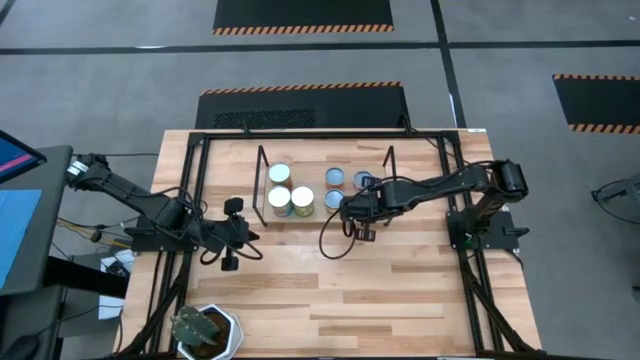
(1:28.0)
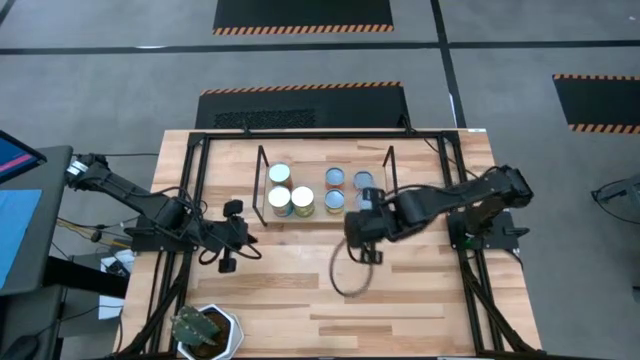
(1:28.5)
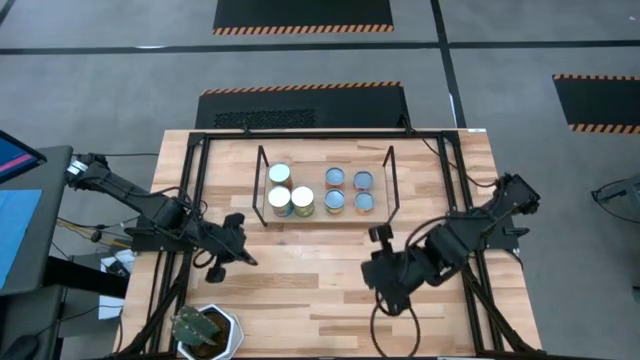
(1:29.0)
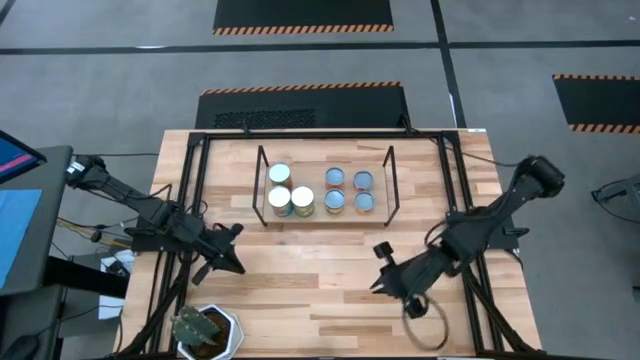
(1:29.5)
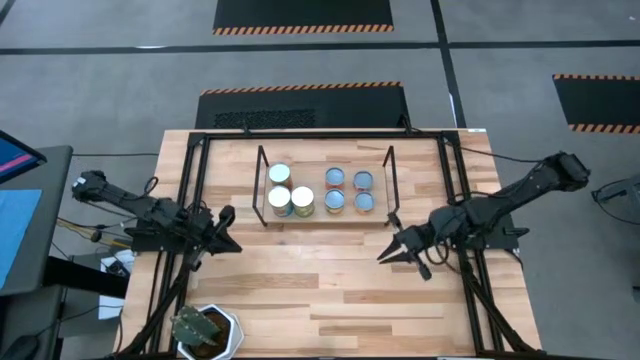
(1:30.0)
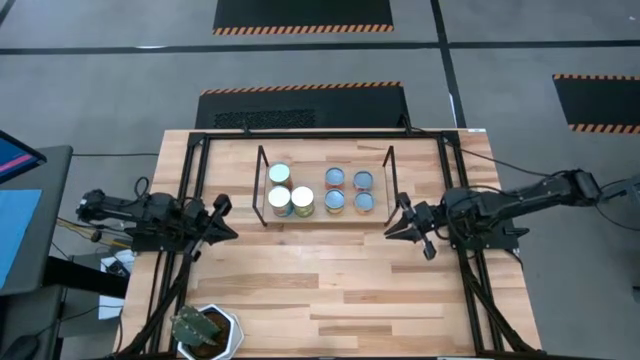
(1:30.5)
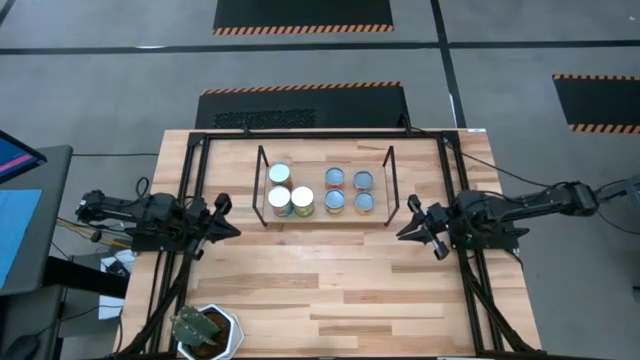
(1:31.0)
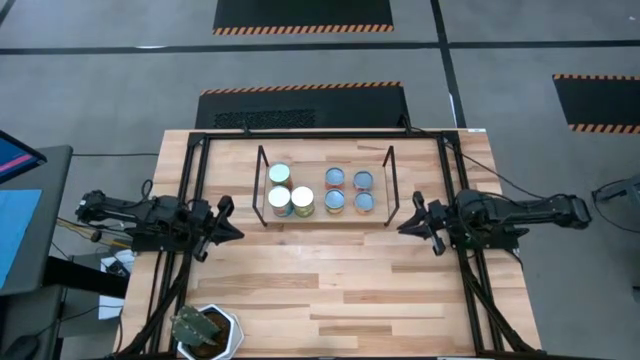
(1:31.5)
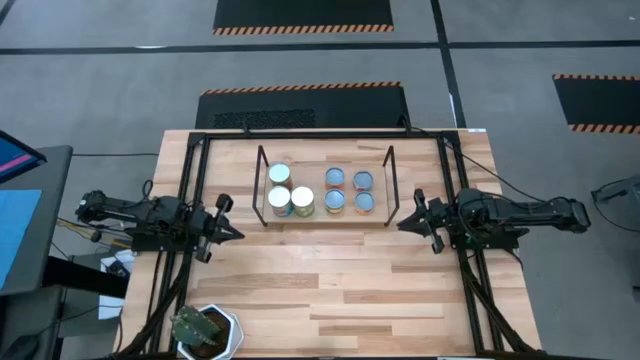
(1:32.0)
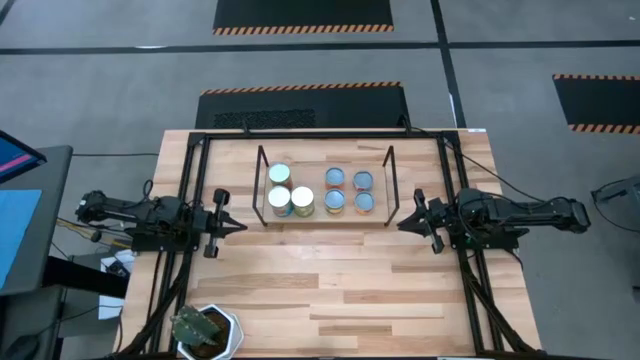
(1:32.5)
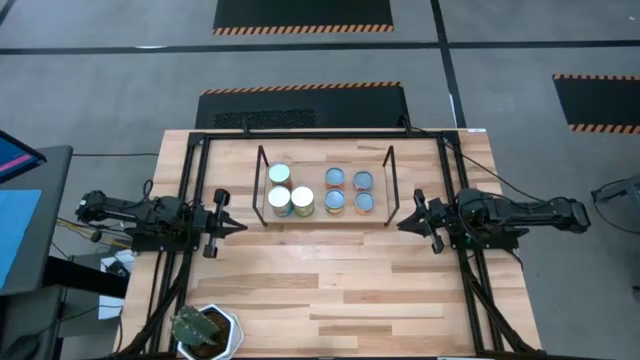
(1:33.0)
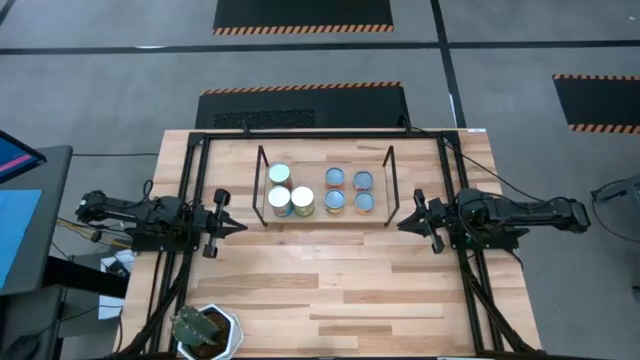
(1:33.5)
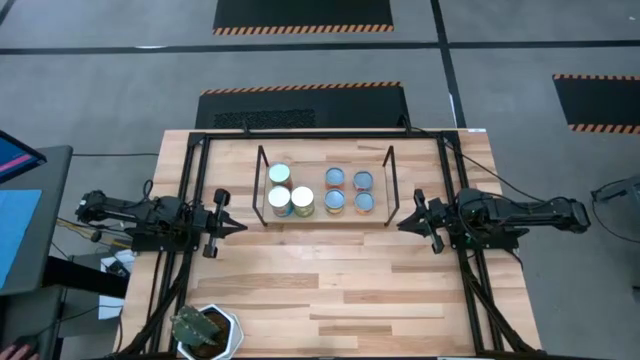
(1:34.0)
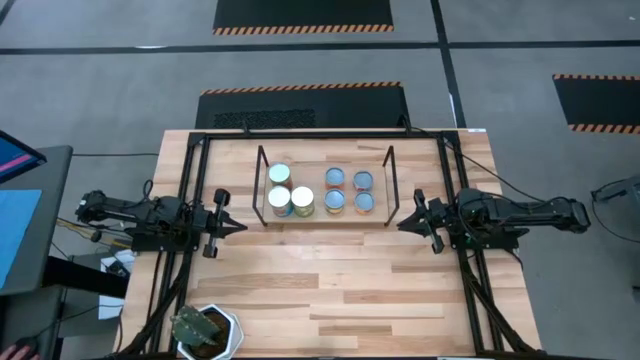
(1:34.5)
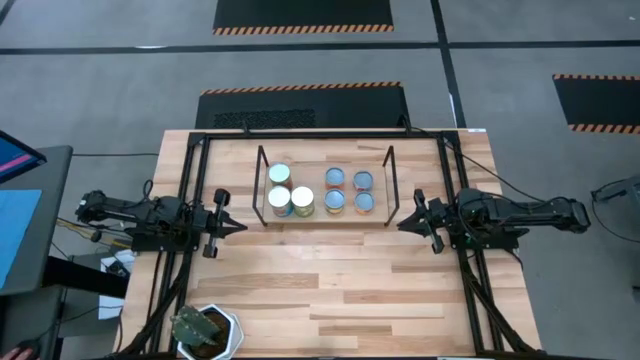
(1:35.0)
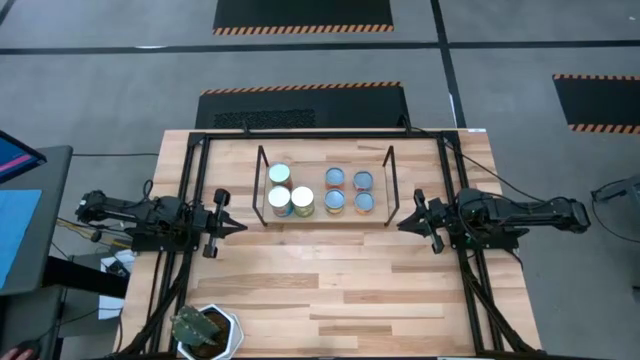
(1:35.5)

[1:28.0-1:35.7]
Task: Pick and place cans onto a shelf
Return to Home Position

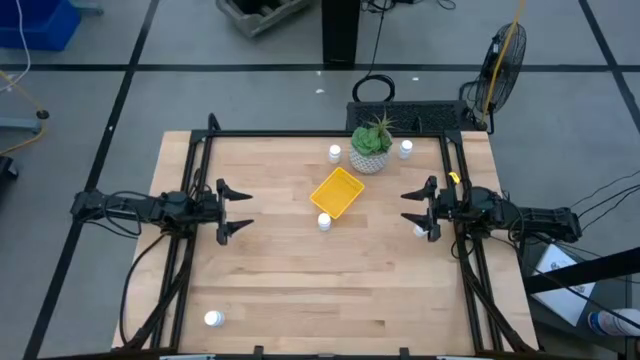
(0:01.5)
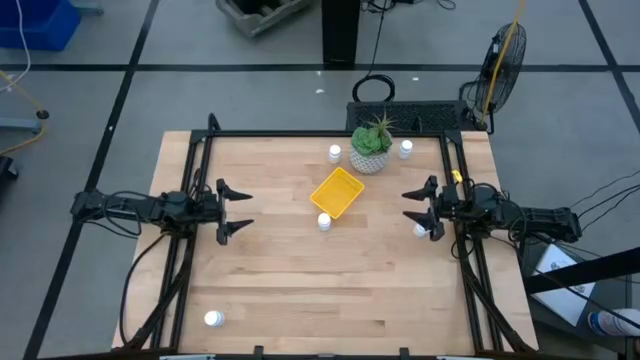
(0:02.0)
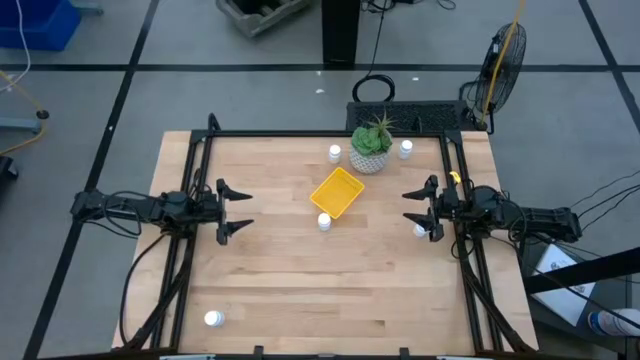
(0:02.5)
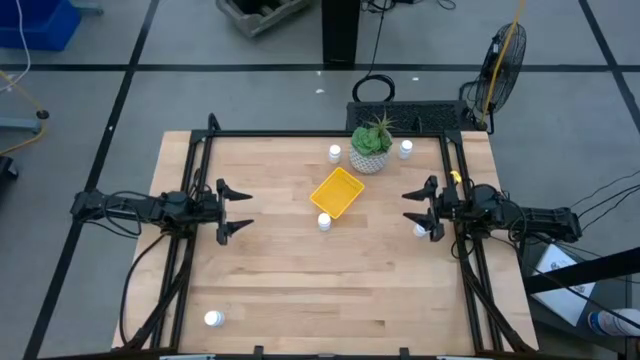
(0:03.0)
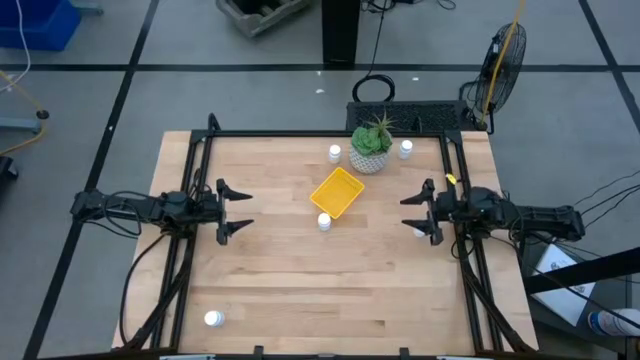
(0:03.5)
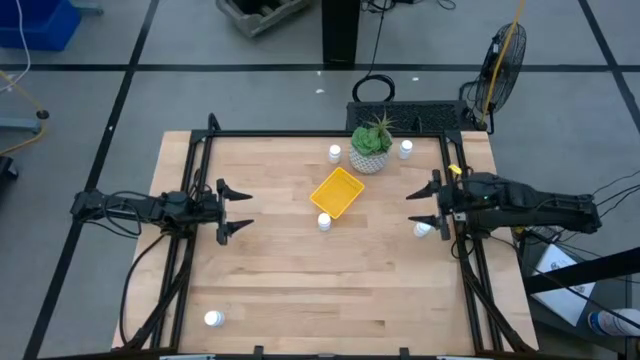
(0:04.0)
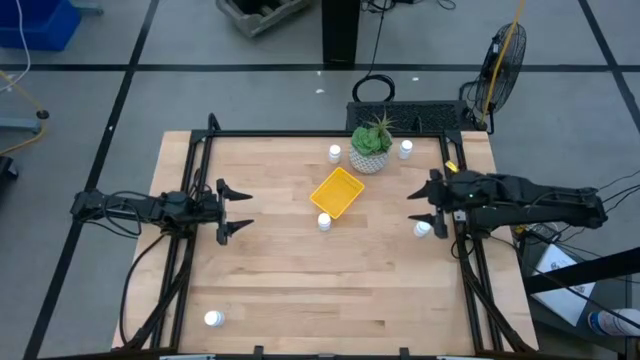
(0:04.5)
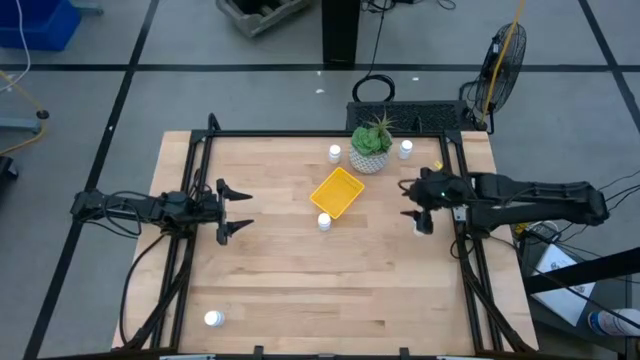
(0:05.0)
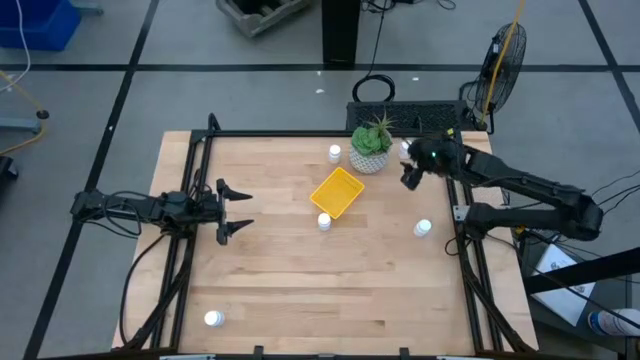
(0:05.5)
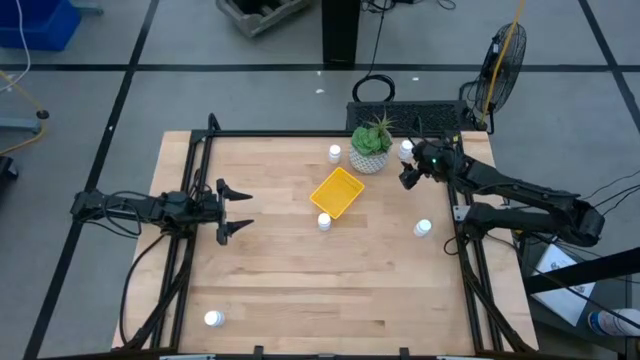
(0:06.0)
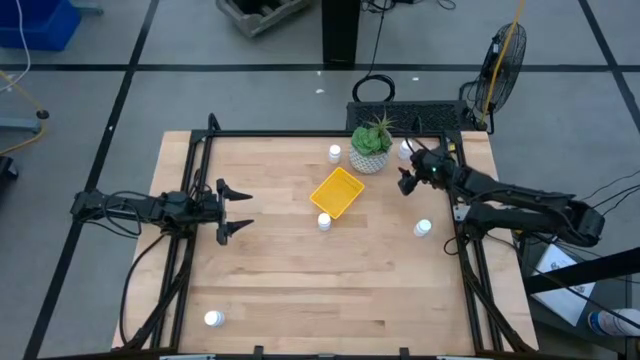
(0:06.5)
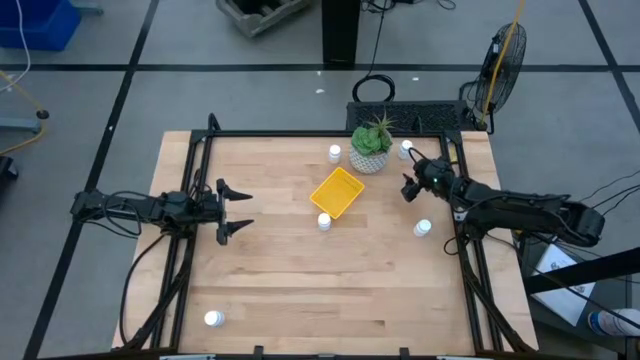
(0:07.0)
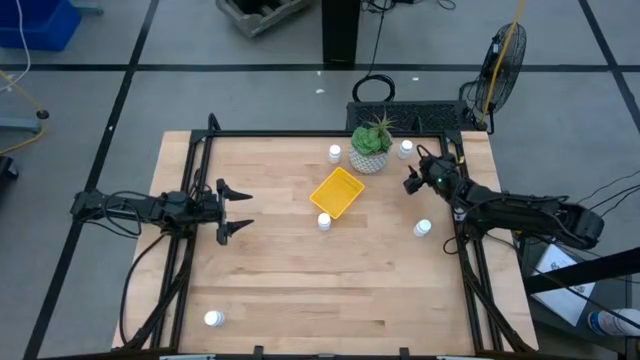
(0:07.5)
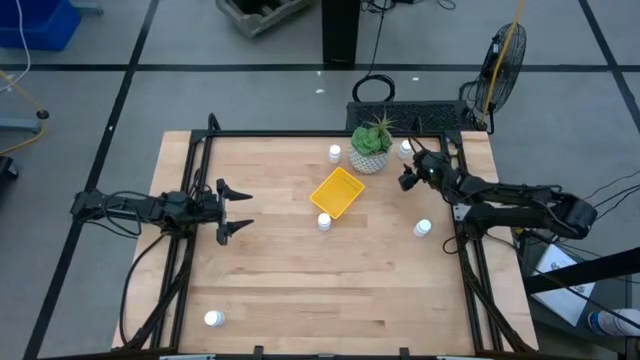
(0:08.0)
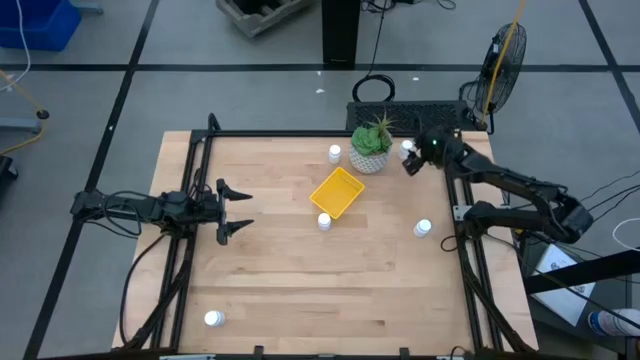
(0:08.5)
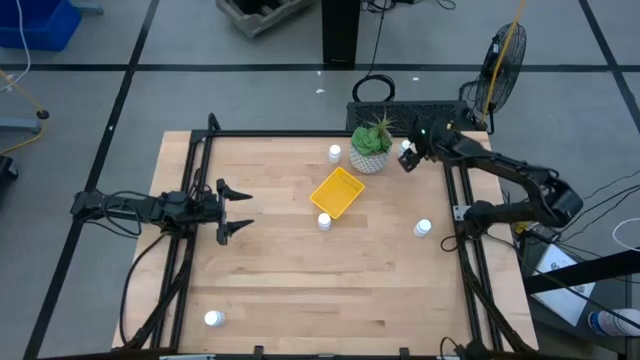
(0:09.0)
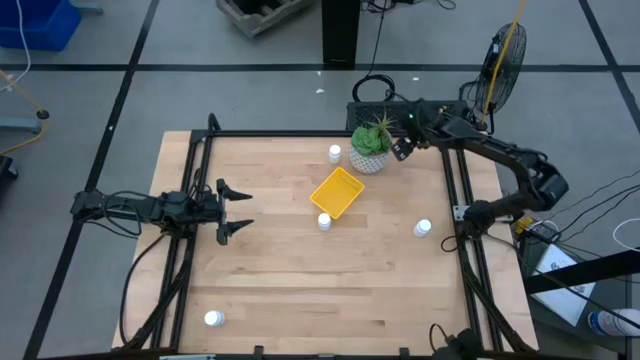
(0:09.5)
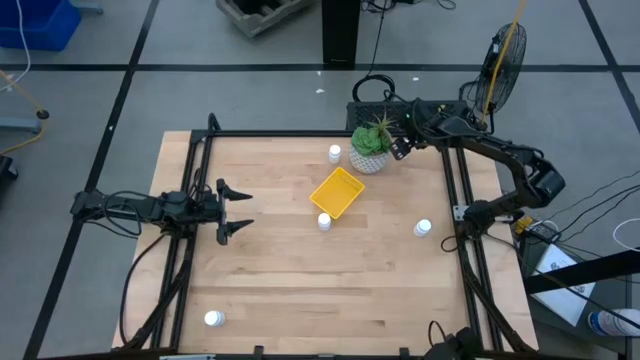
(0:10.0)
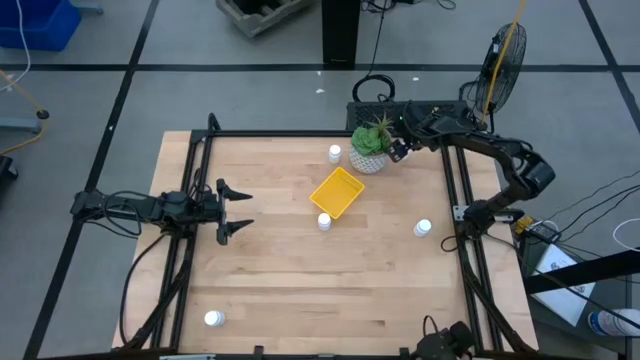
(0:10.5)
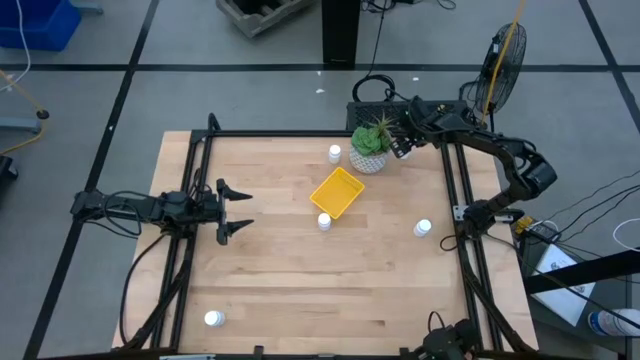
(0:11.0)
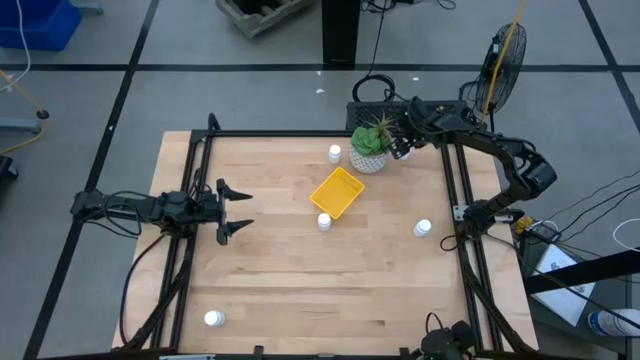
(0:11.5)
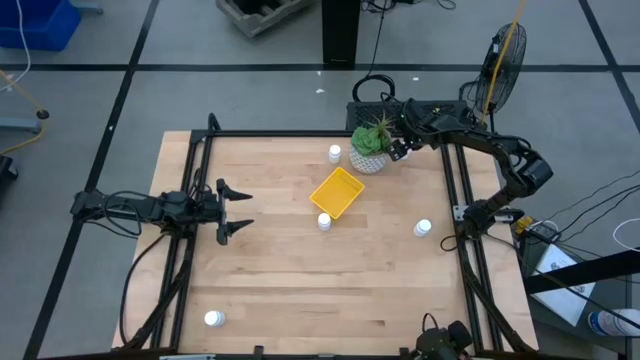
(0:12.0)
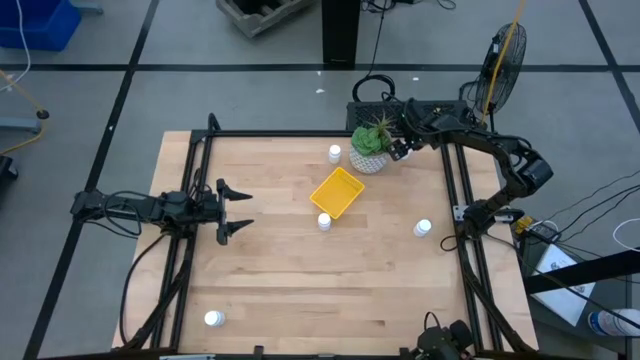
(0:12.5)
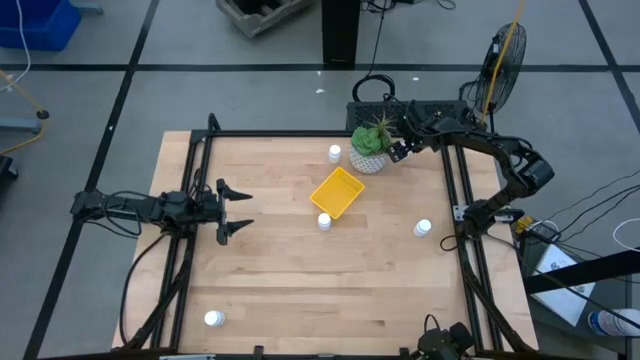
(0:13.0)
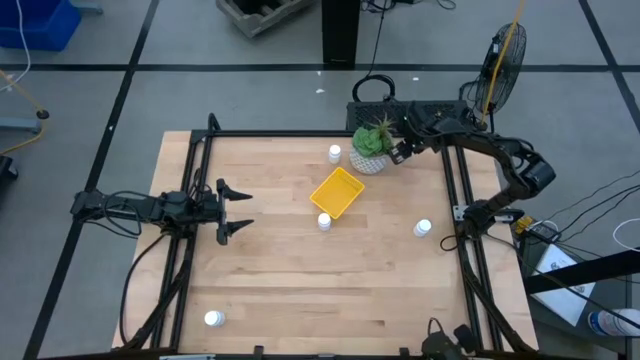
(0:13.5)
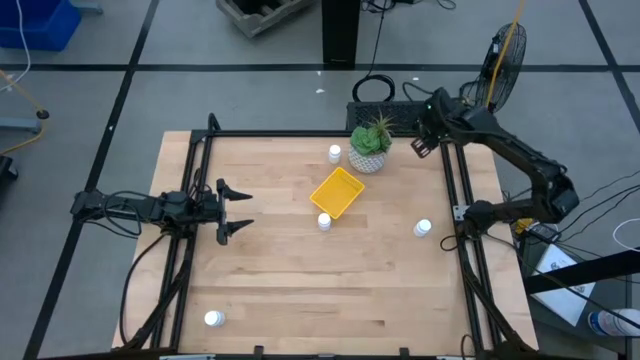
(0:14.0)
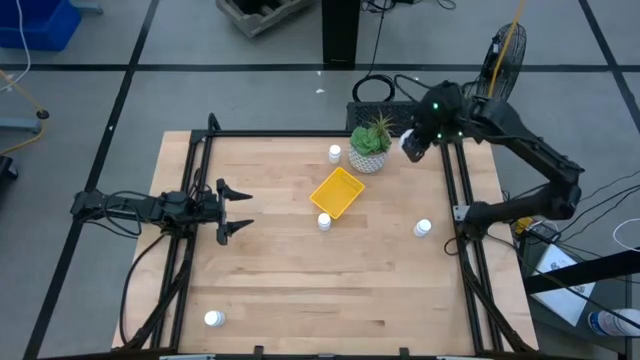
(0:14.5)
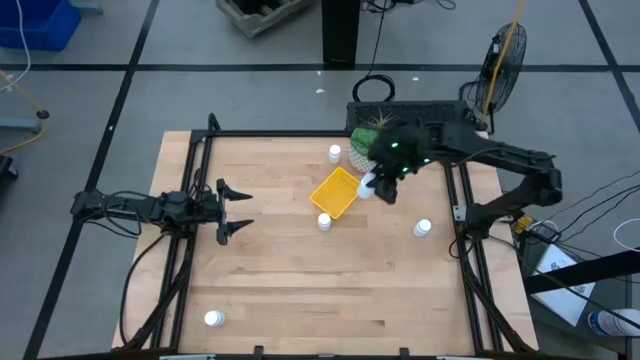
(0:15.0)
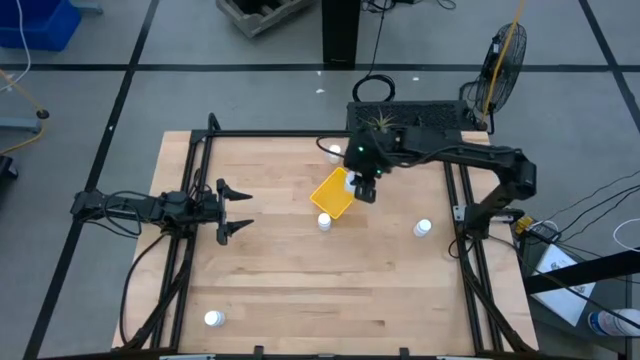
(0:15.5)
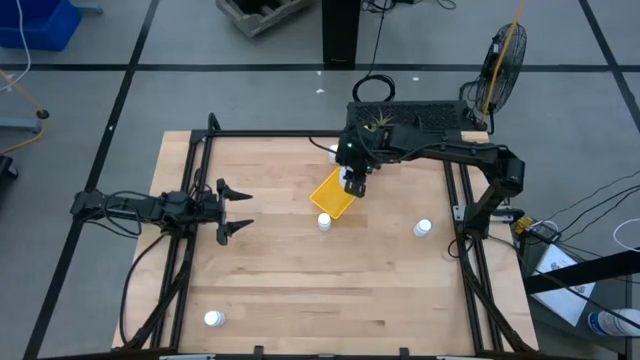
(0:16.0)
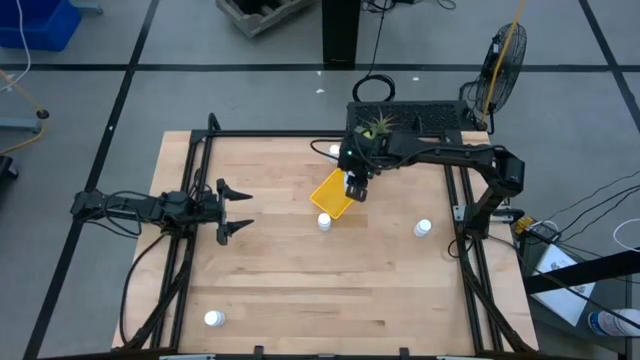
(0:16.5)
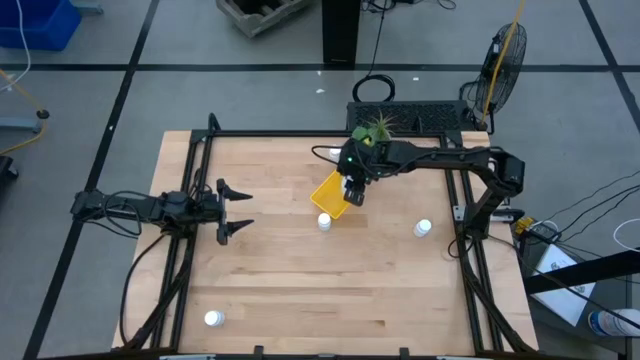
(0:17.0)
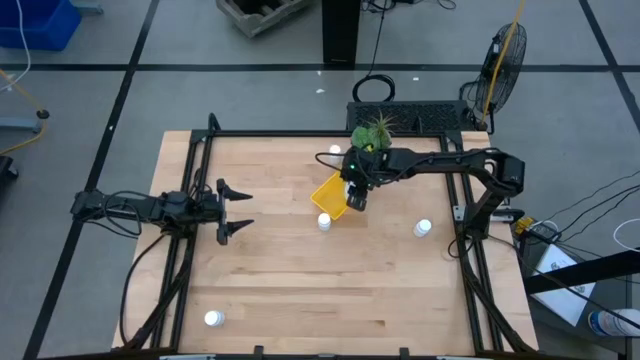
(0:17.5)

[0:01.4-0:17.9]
Task: Pick and place pill bottles into a basket
Put the top right white medicine bottle into the bin
